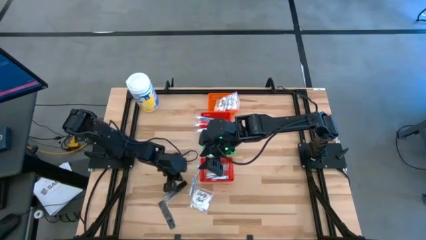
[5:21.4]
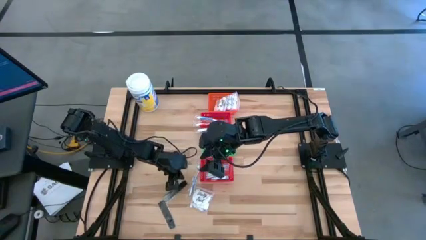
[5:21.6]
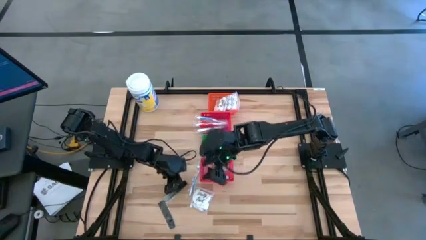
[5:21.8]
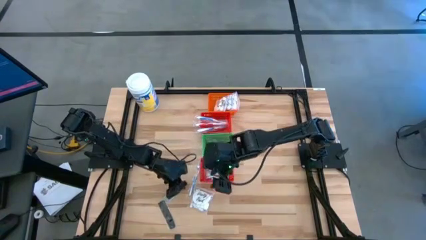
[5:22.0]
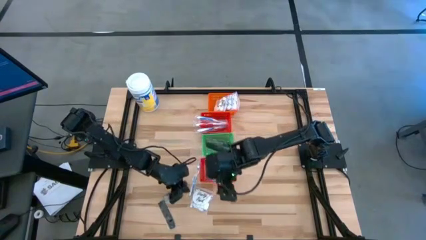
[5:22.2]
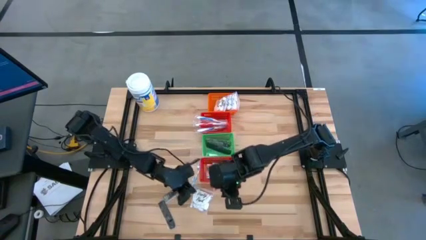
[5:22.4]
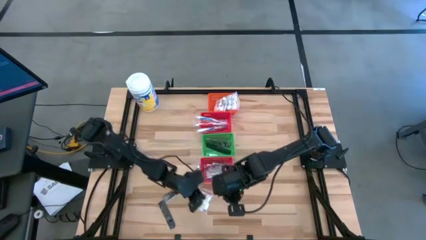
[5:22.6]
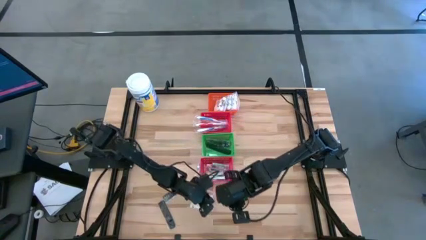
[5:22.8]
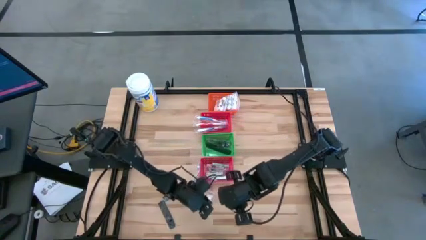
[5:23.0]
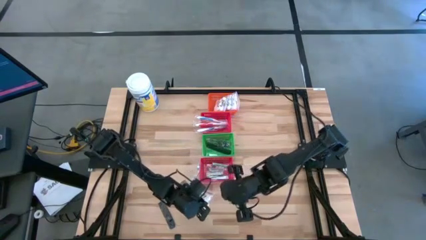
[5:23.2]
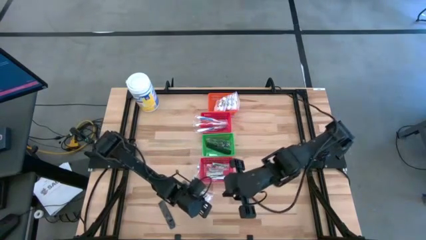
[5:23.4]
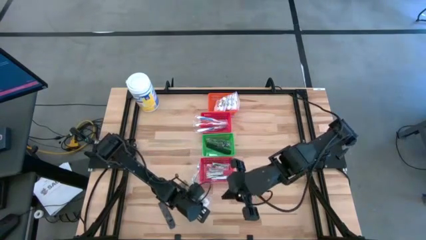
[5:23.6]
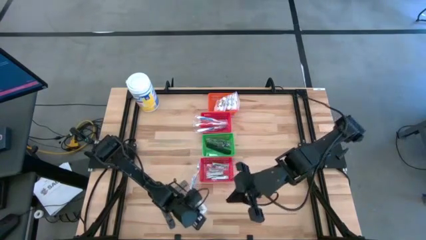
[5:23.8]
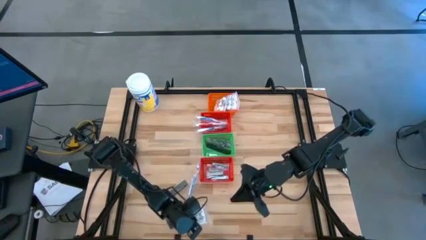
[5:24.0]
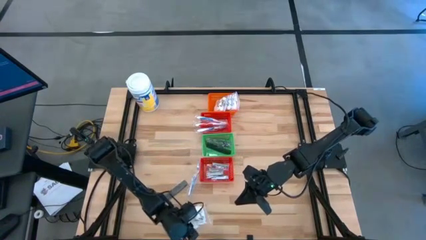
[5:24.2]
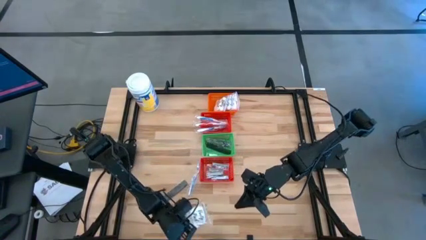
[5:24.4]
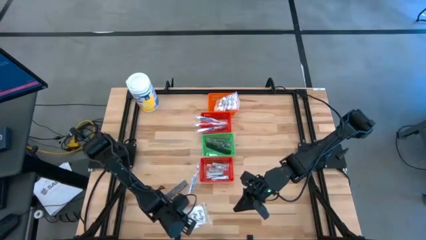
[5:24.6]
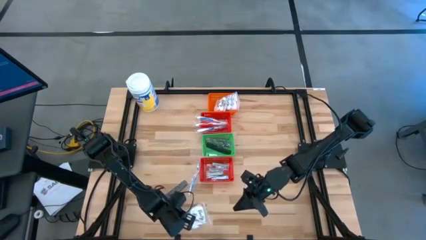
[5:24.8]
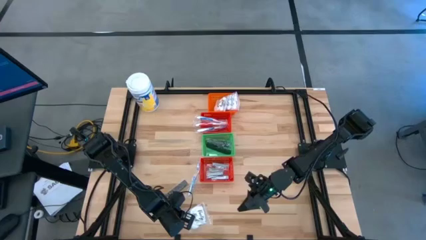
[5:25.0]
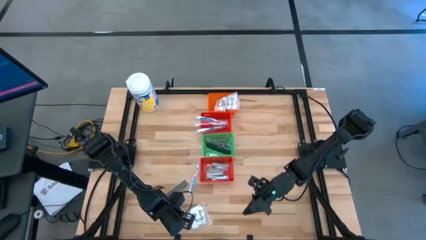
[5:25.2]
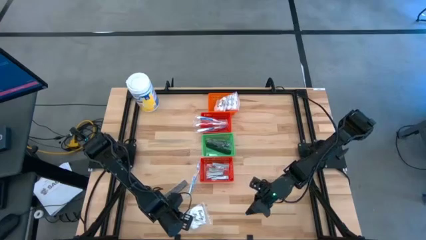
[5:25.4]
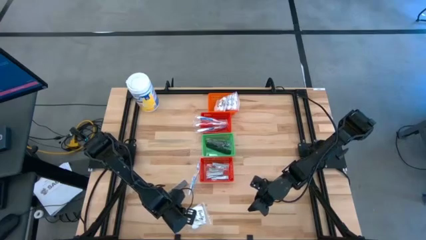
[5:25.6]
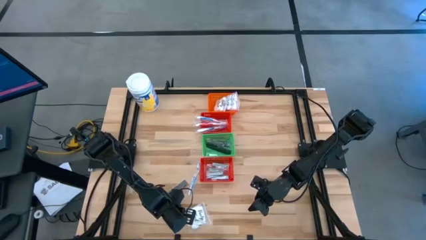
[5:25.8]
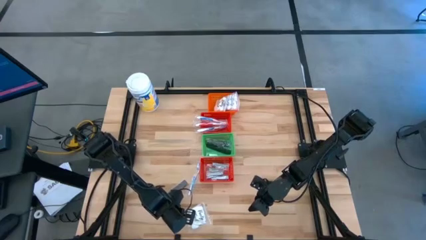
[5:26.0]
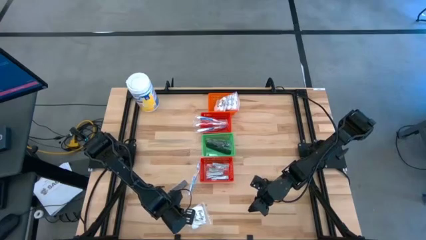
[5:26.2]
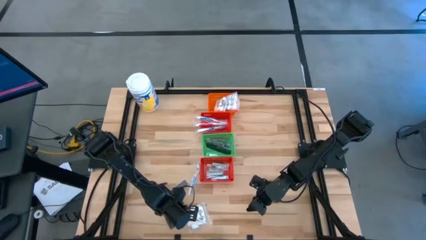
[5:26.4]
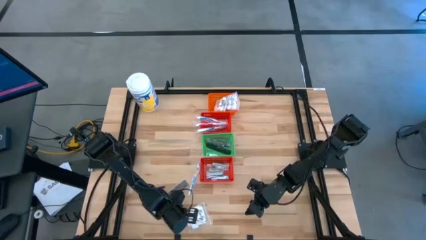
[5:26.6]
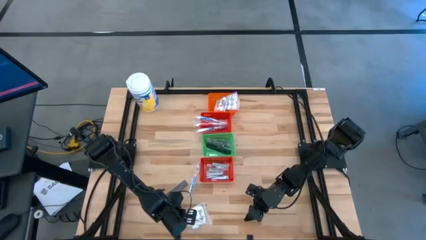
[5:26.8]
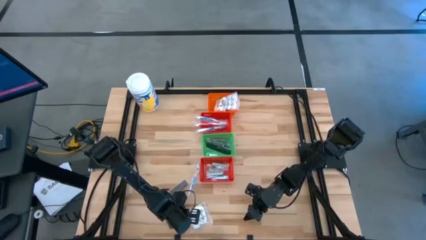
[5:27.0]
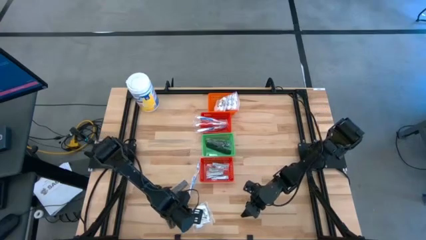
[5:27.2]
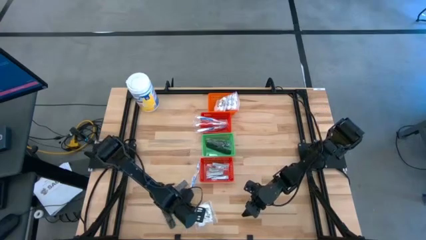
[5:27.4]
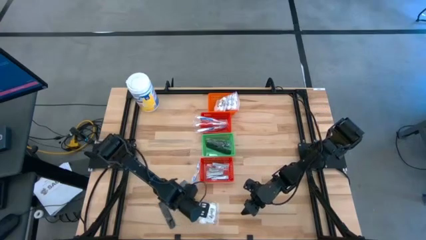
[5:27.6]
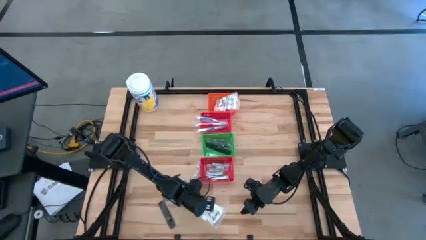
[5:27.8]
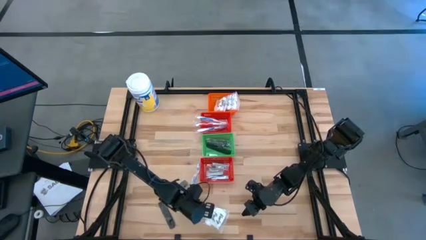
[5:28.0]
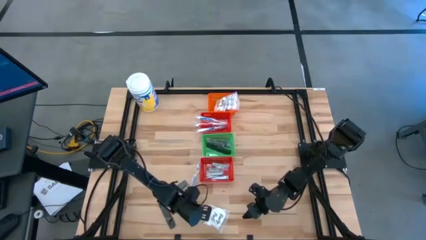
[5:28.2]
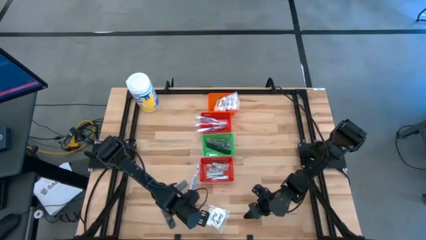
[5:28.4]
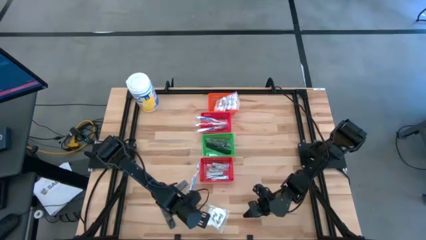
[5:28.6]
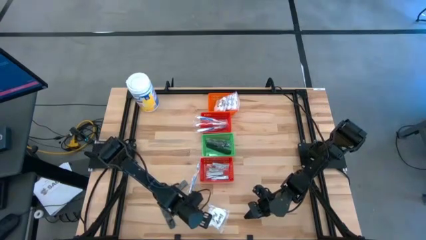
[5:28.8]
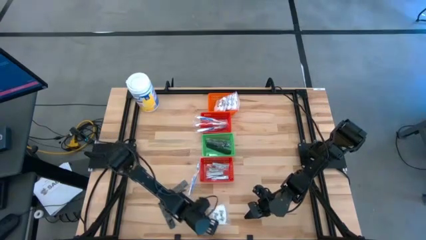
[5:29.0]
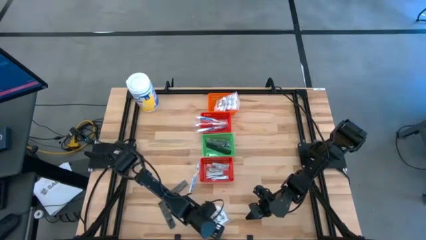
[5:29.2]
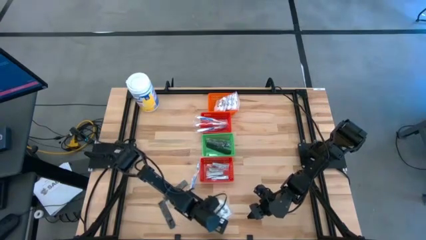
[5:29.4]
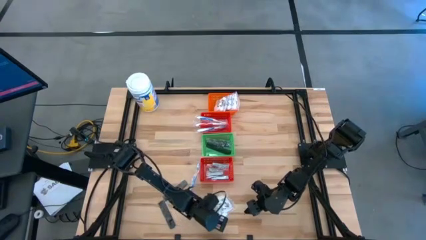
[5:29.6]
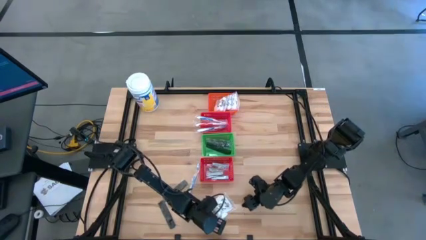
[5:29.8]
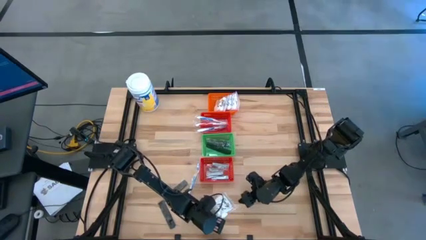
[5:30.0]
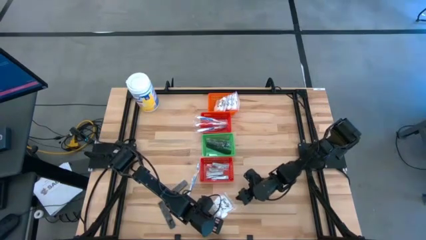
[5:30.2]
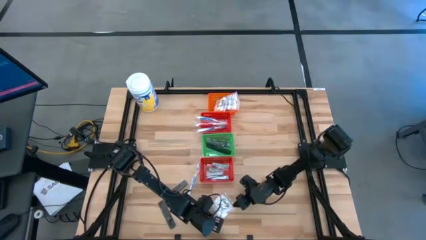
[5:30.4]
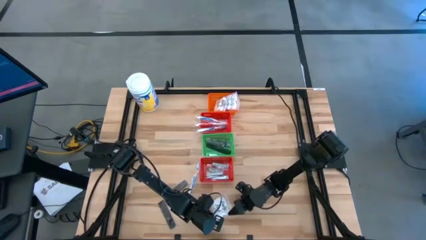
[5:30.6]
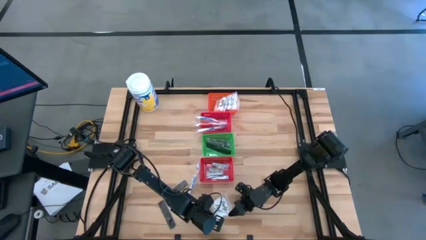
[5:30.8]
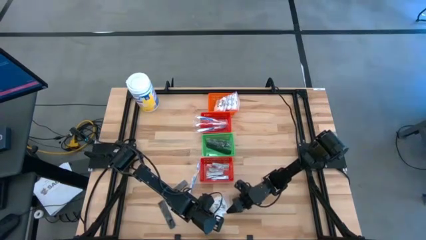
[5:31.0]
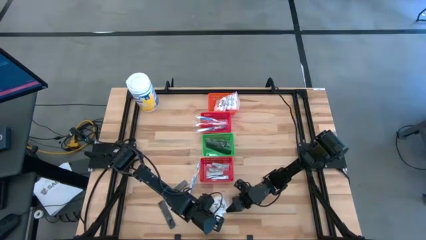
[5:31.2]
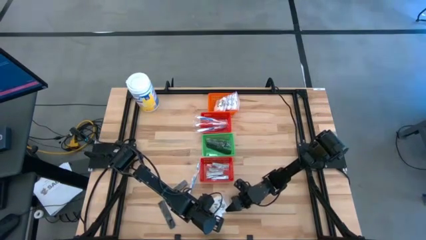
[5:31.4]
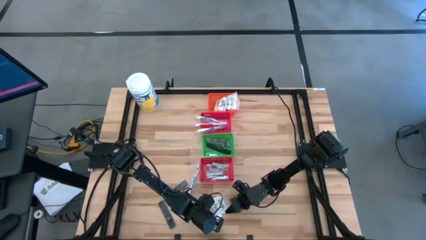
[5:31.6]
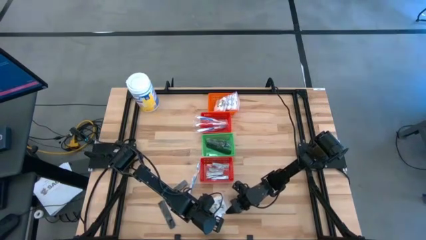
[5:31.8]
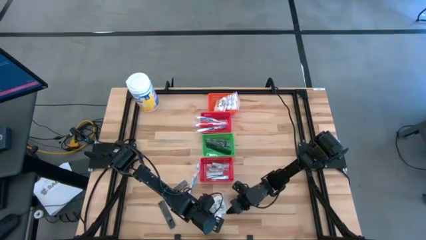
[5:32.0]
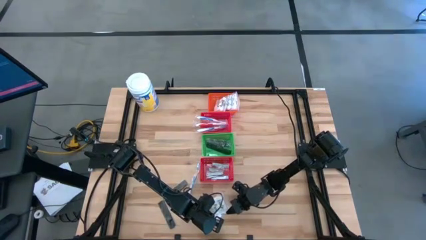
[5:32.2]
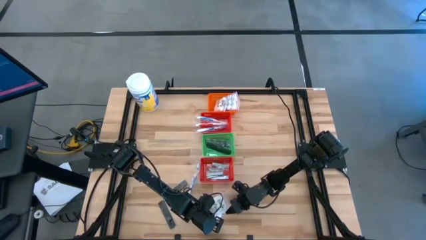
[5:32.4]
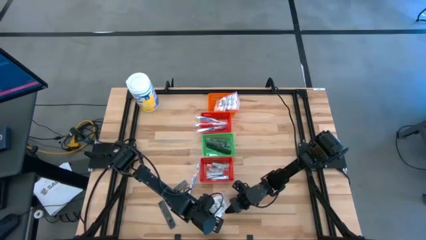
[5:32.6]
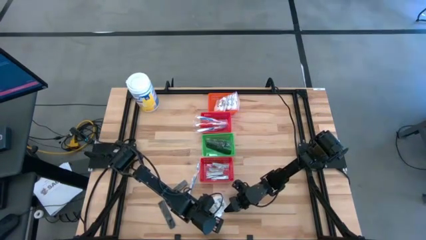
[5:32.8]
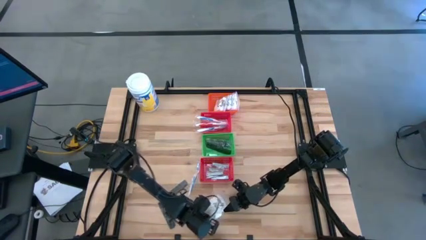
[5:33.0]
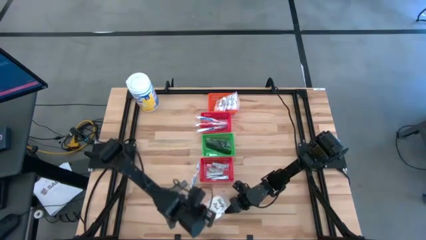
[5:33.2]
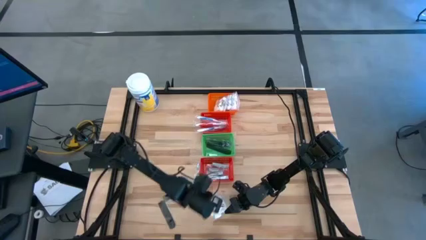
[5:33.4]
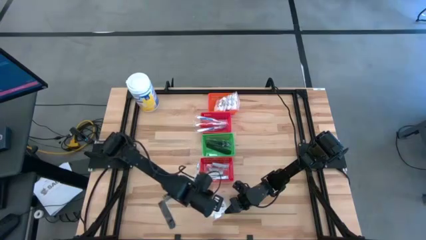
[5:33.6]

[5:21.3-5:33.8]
Task: Pick & Place Travel size toiletries
Put the transparent cotton pack into the orange basket
